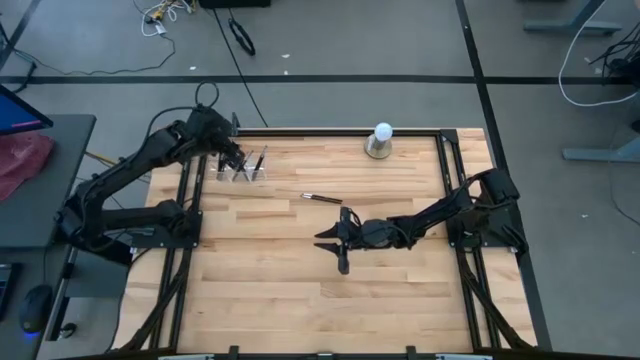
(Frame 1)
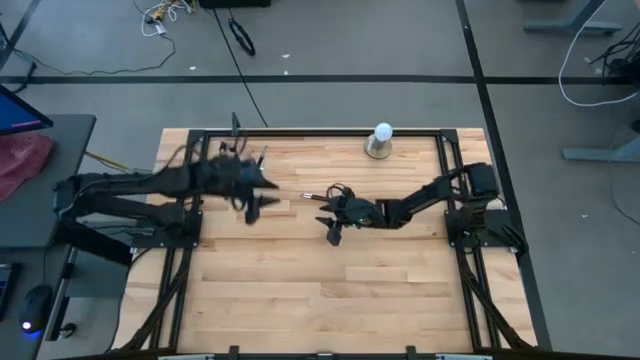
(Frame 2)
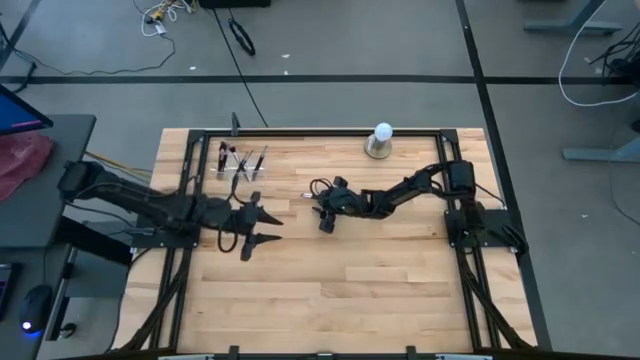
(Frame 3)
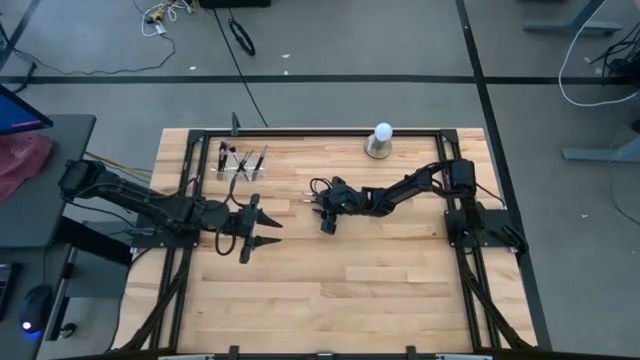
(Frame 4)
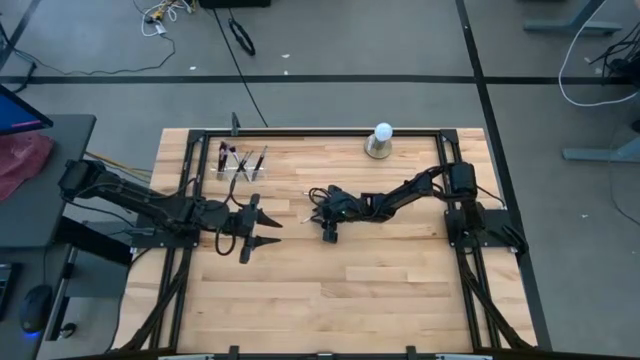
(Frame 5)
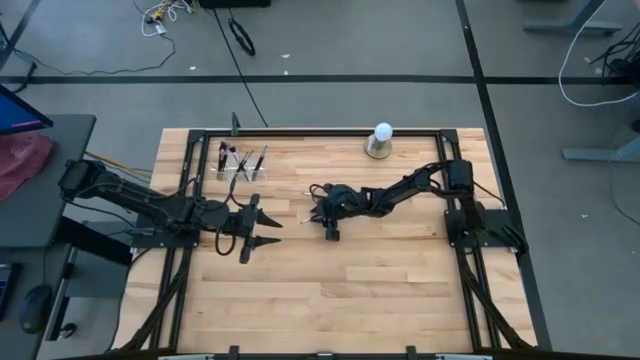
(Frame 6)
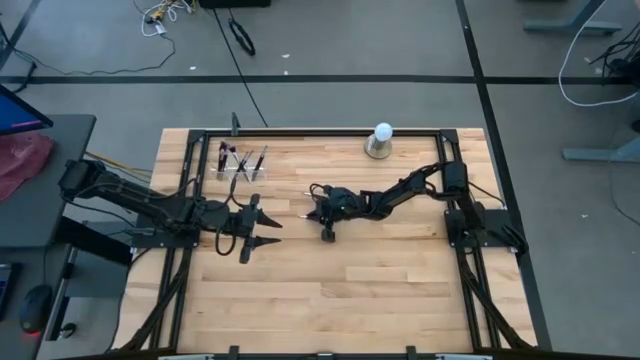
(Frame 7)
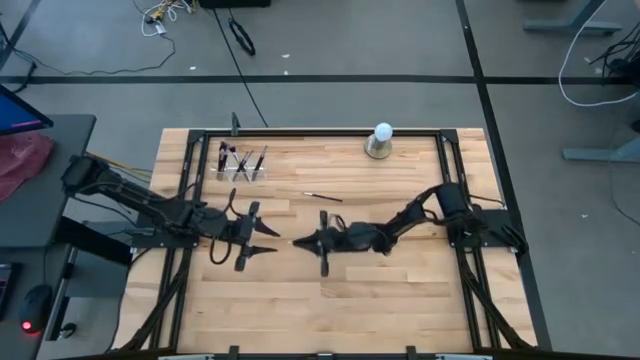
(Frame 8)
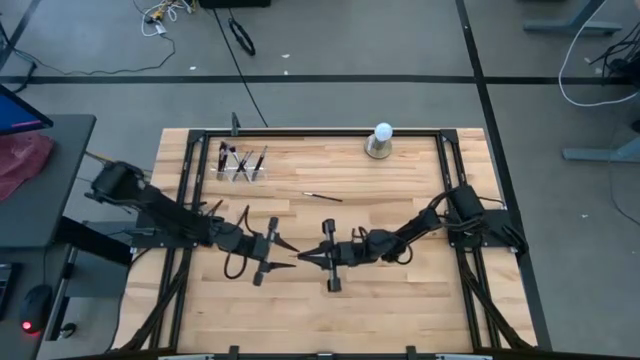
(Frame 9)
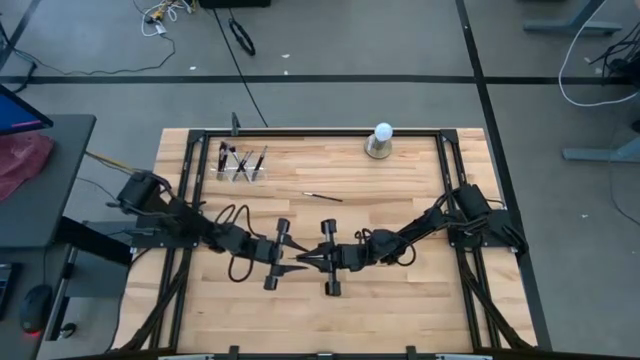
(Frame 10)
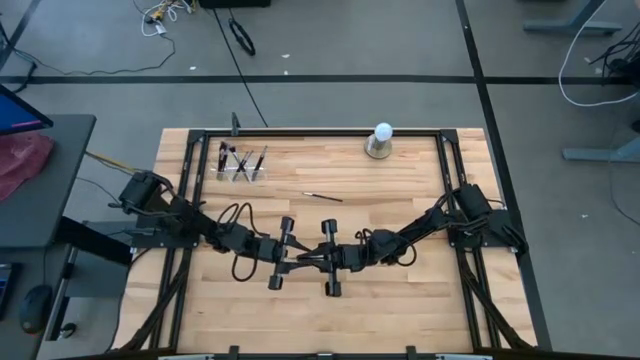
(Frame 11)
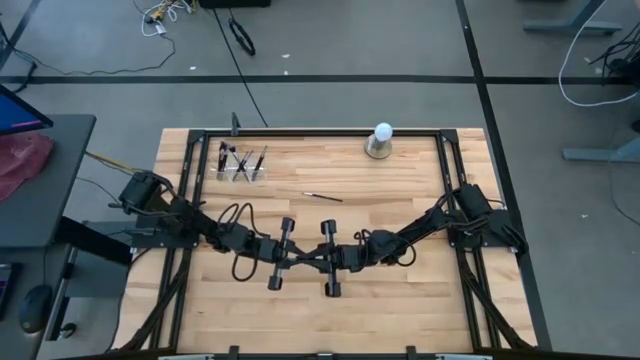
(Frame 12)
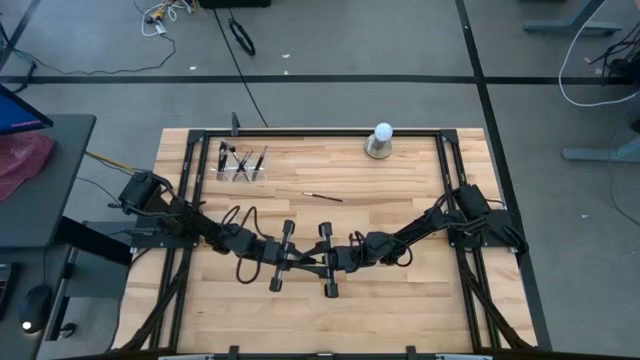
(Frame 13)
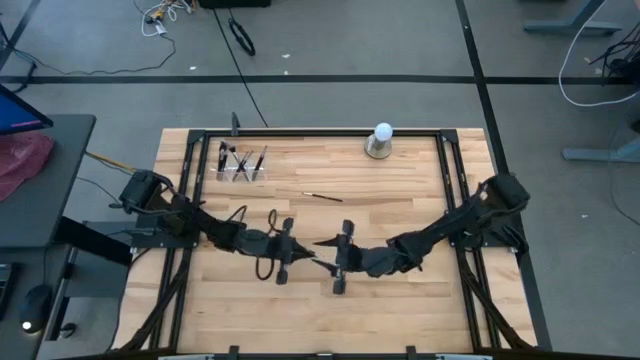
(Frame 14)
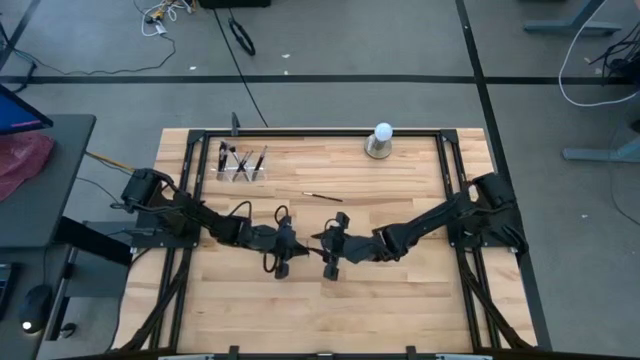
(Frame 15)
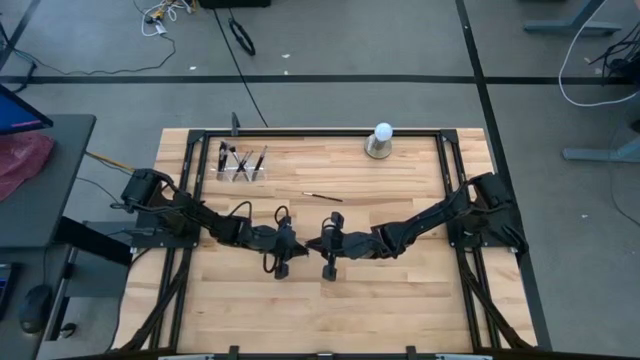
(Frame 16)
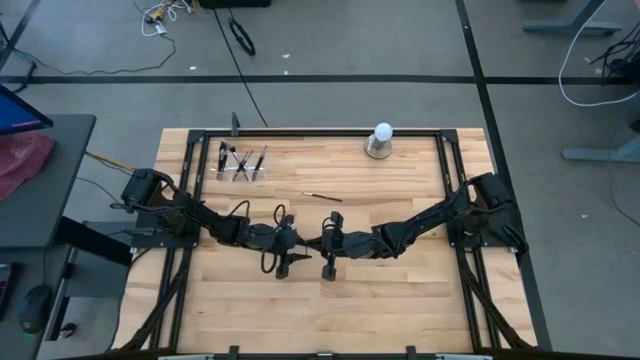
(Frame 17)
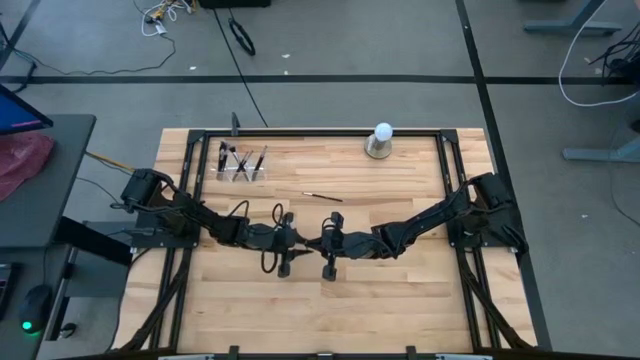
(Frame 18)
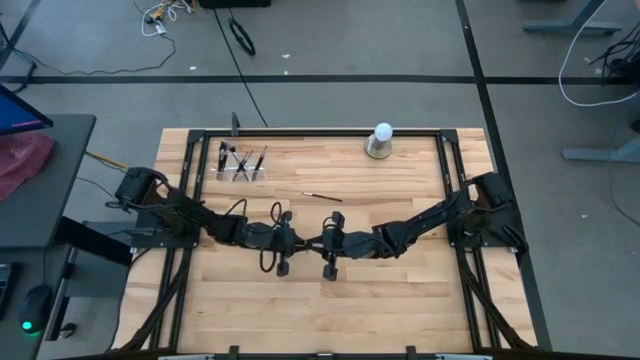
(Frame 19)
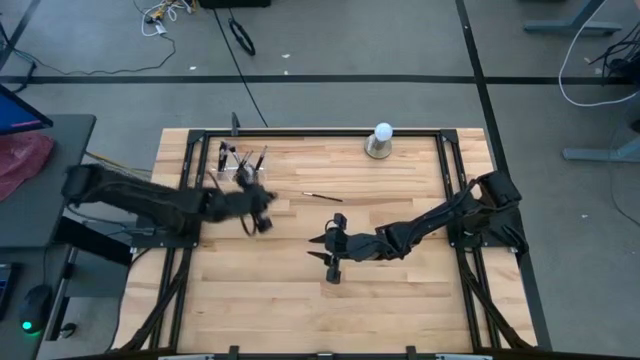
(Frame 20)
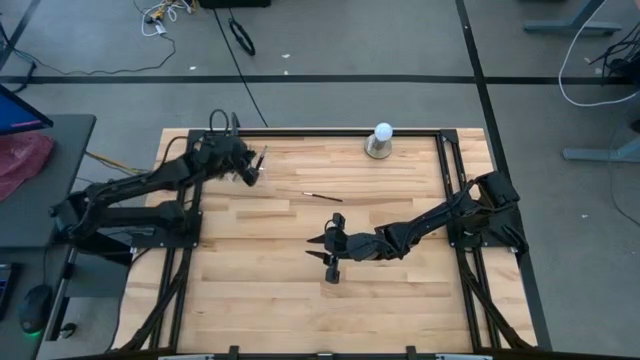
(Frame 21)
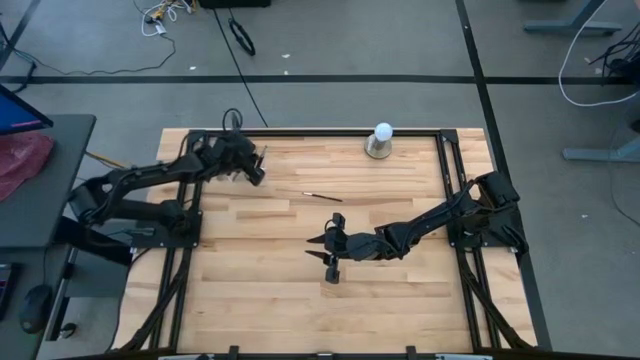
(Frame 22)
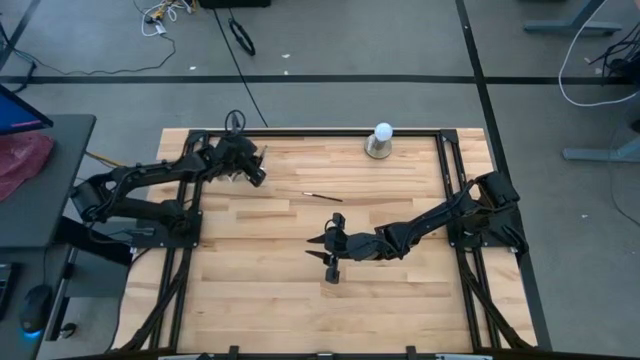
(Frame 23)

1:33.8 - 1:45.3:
Task: Put items in baskets/containers
Put the eyeshadow brush into the transparent organizer

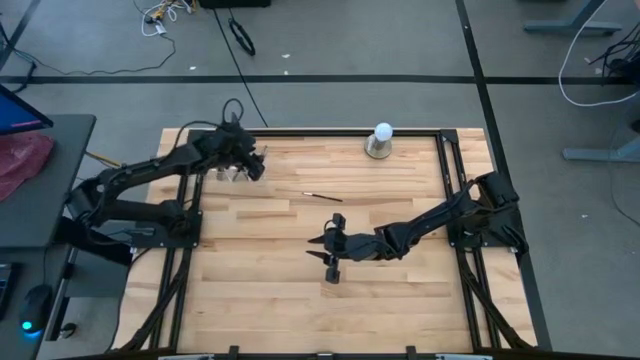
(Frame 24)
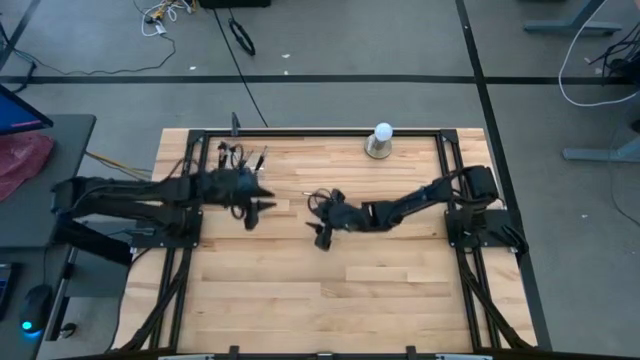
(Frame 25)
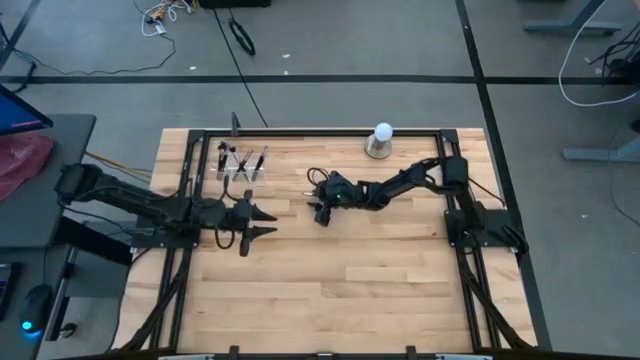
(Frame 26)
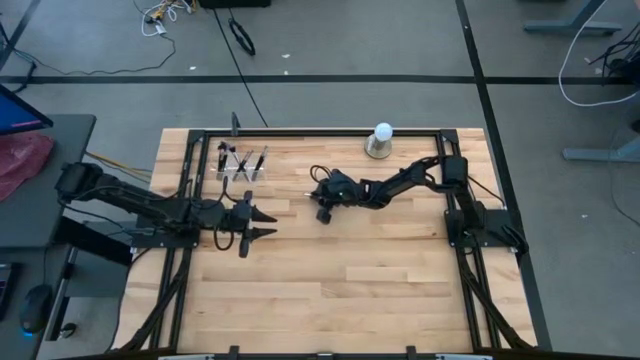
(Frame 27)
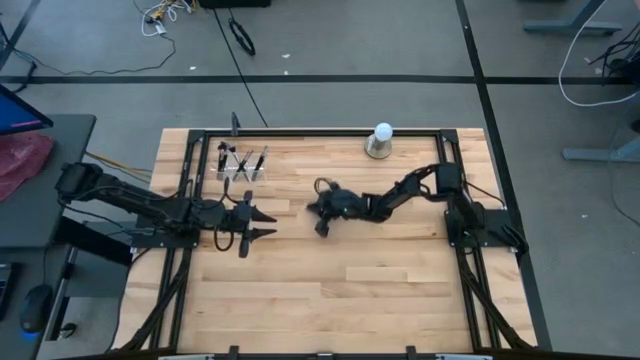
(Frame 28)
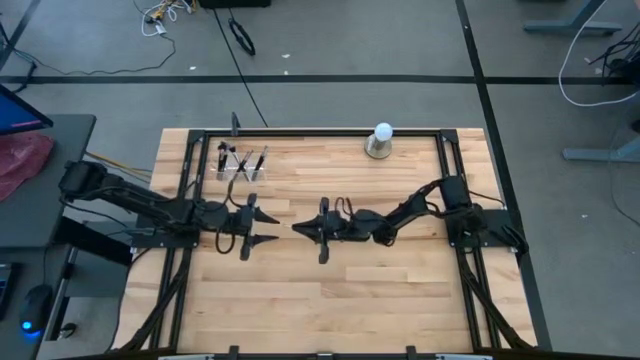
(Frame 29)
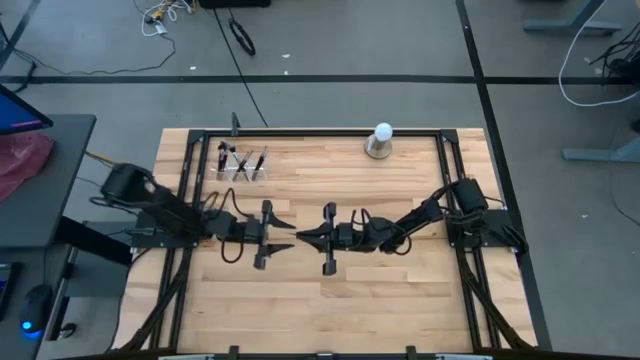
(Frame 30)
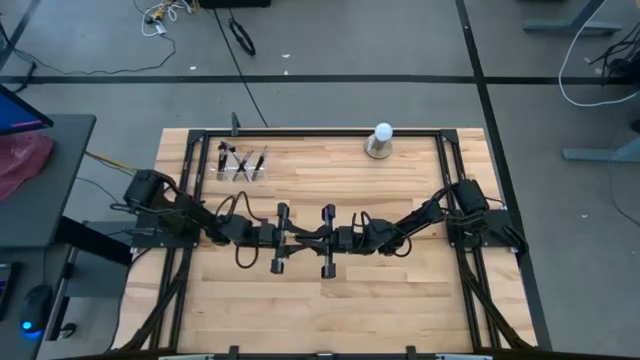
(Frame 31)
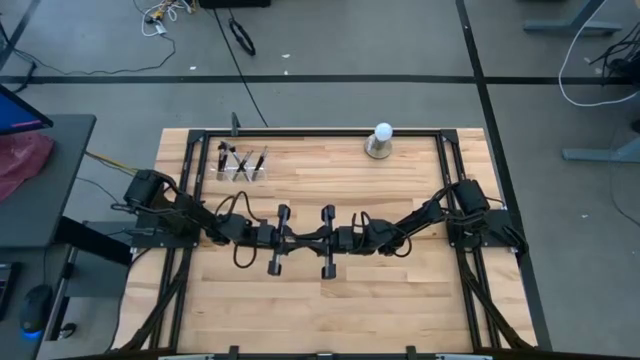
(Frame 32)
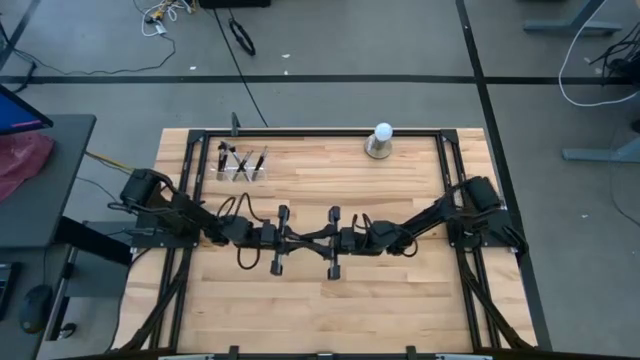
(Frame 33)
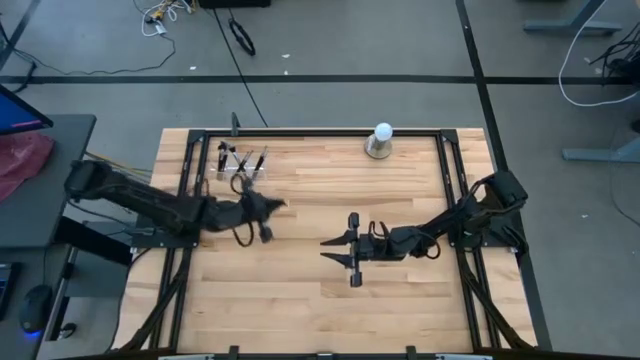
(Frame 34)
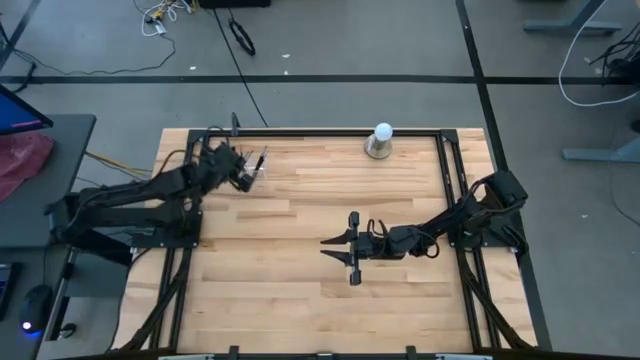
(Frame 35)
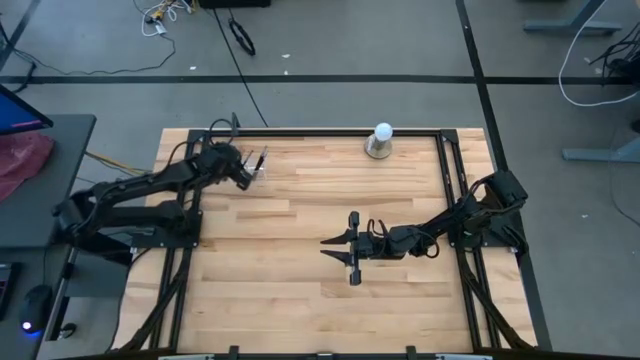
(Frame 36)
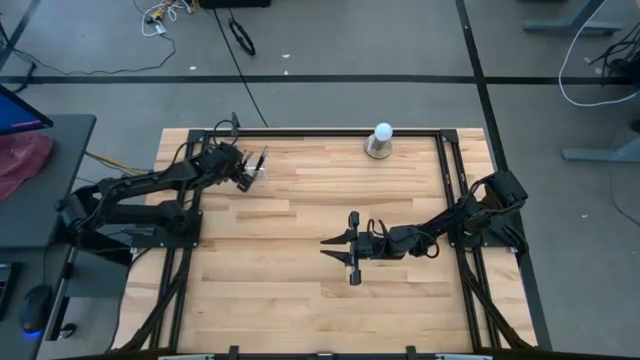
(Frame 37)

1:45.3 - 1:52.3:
Put the eyeshadow brush into the transparent organizer
